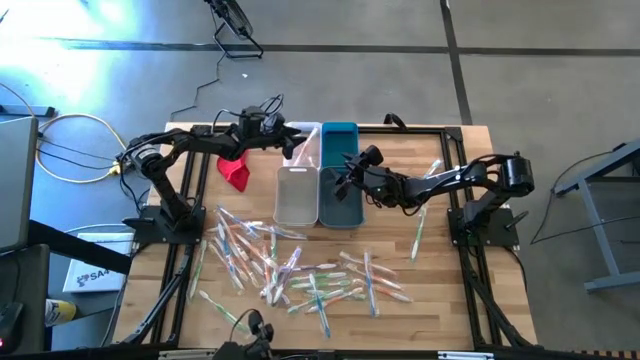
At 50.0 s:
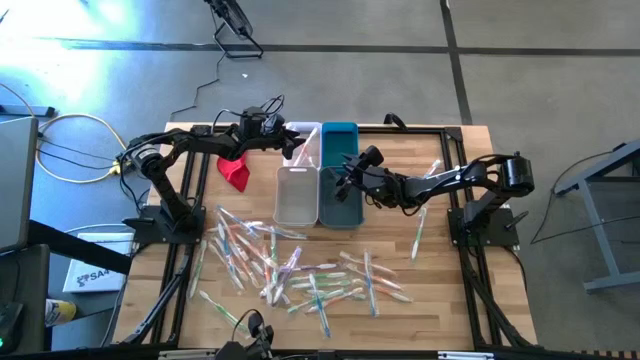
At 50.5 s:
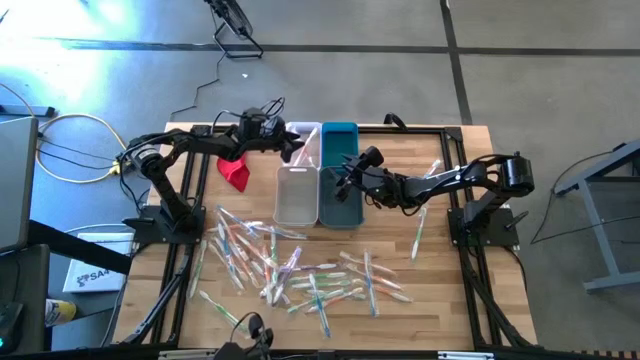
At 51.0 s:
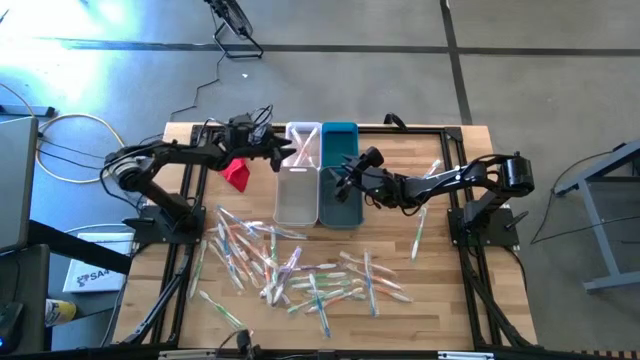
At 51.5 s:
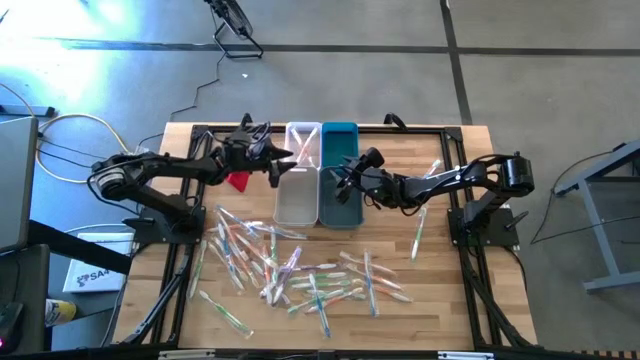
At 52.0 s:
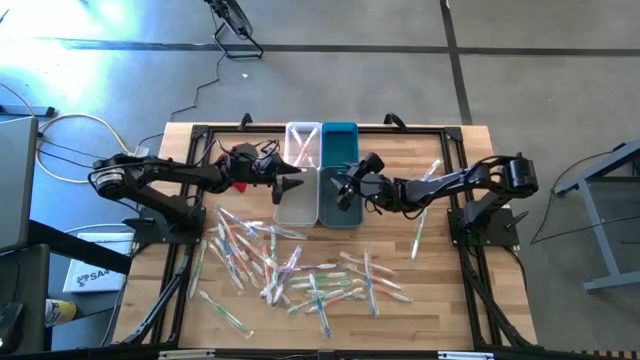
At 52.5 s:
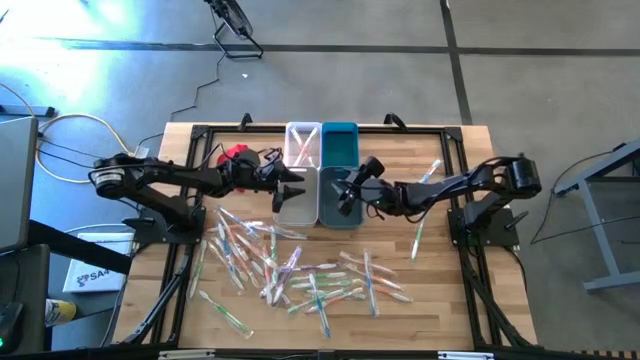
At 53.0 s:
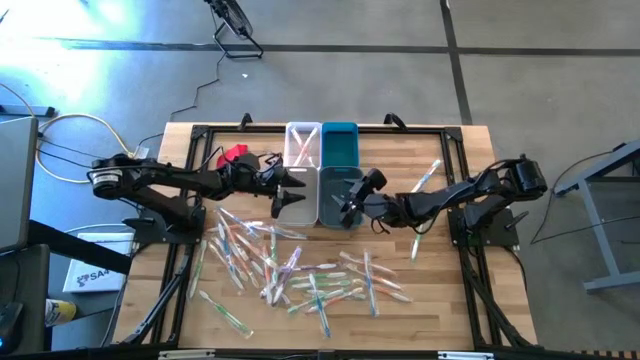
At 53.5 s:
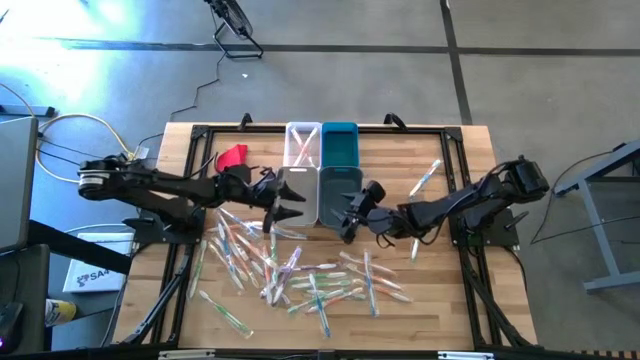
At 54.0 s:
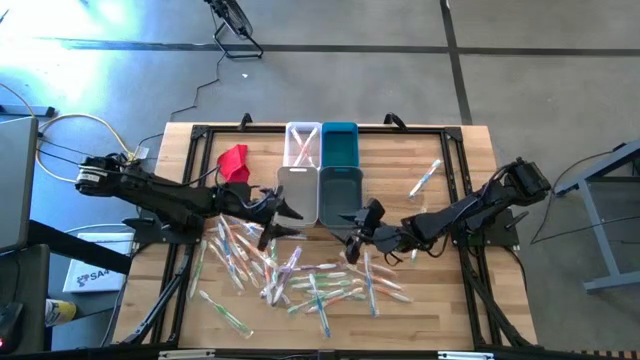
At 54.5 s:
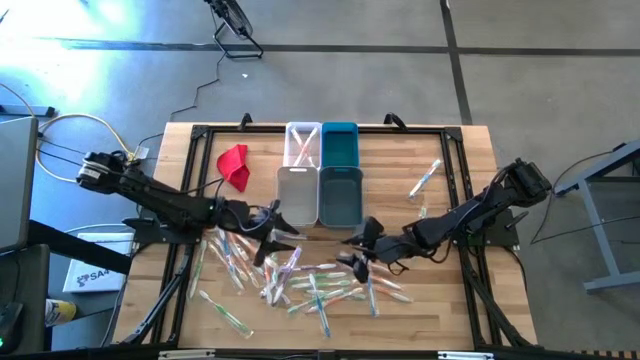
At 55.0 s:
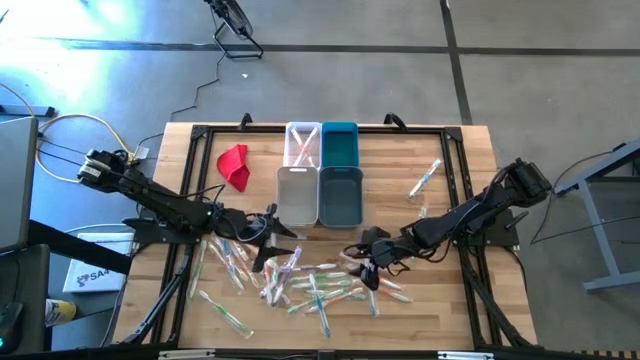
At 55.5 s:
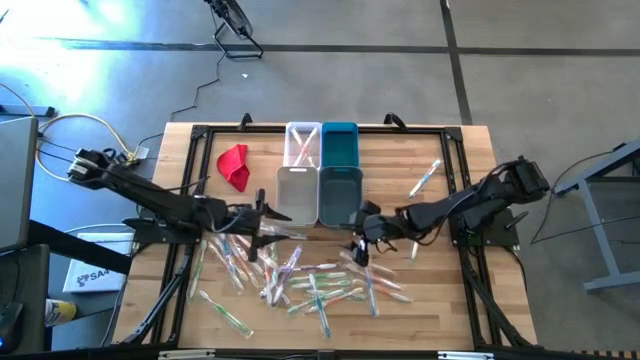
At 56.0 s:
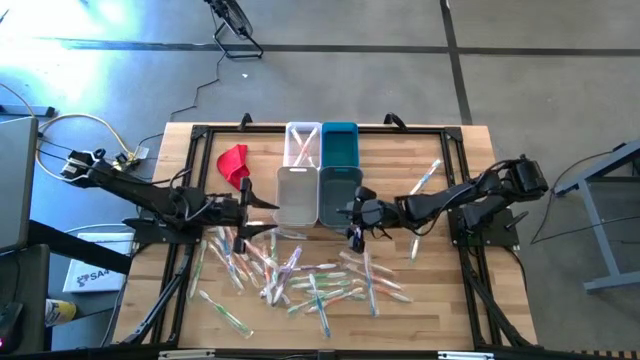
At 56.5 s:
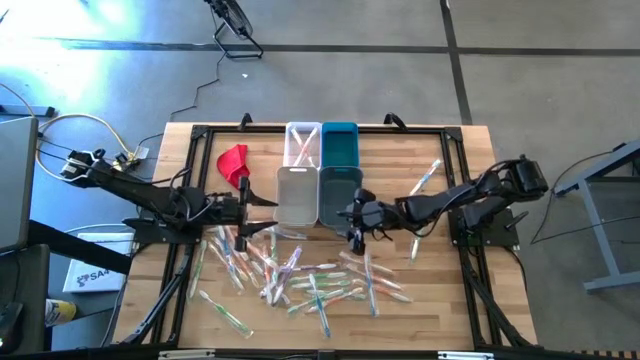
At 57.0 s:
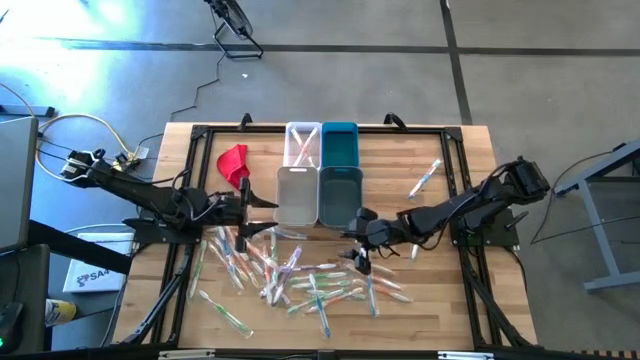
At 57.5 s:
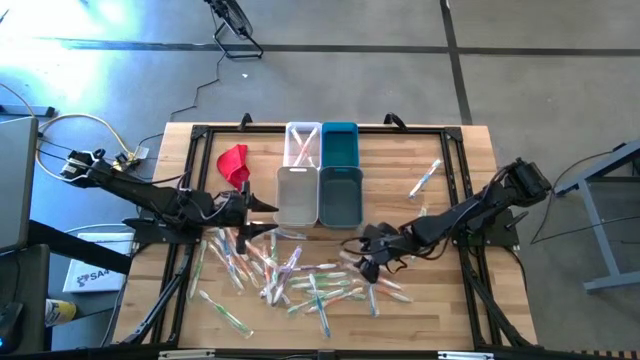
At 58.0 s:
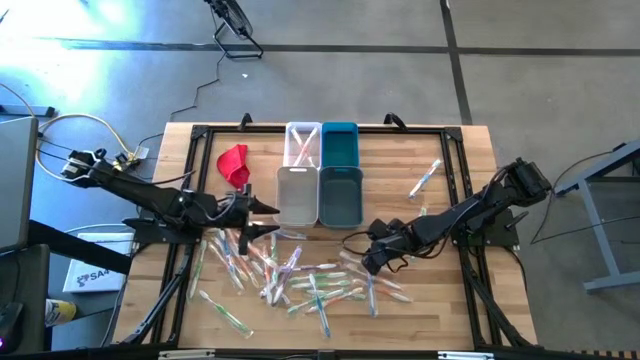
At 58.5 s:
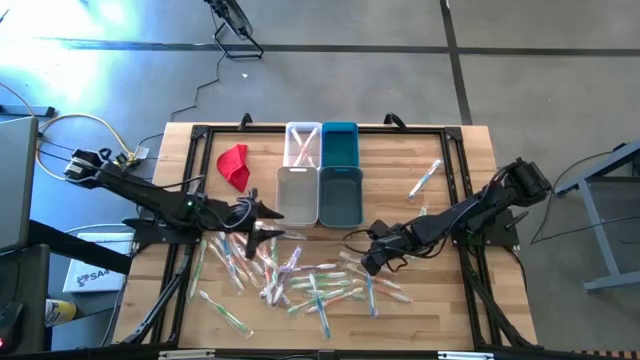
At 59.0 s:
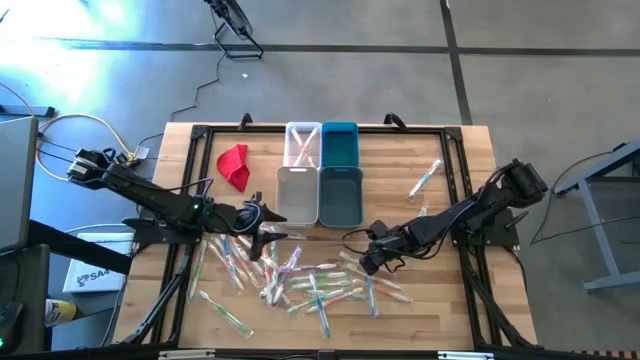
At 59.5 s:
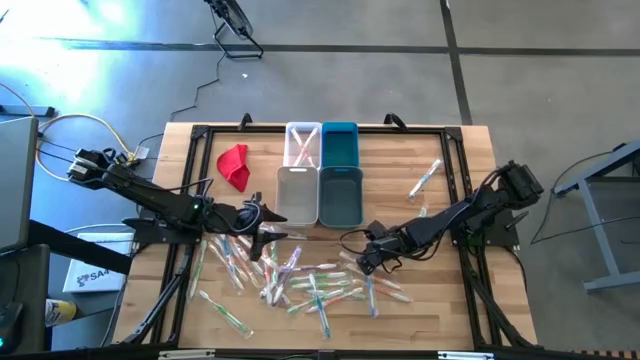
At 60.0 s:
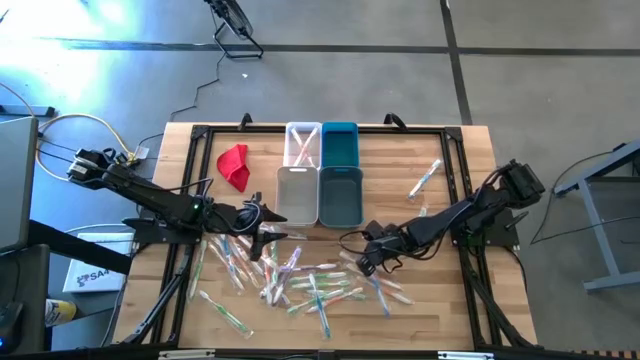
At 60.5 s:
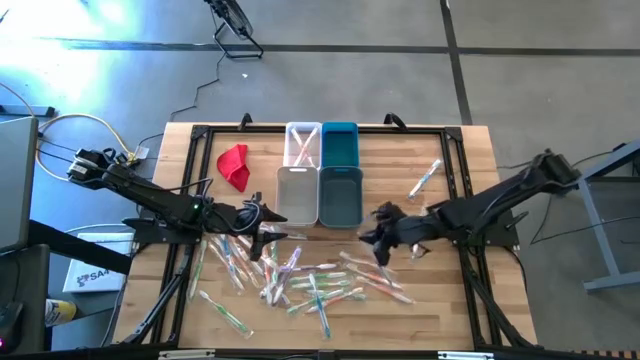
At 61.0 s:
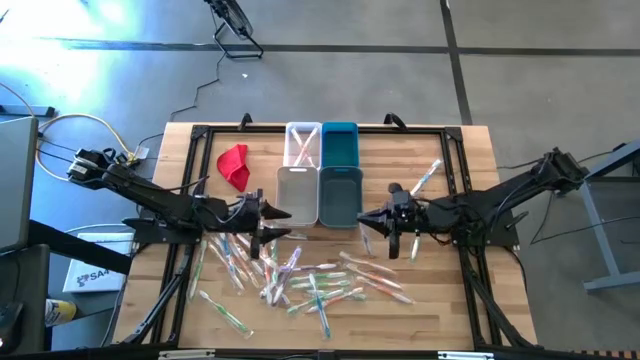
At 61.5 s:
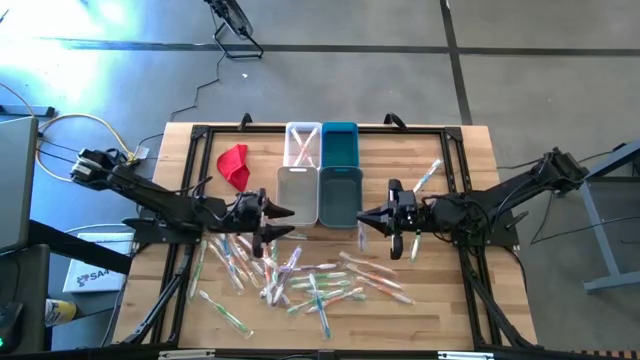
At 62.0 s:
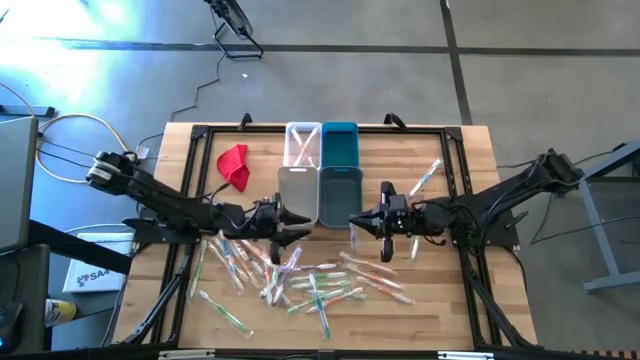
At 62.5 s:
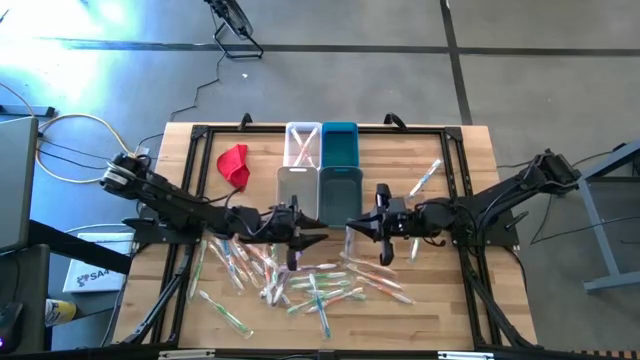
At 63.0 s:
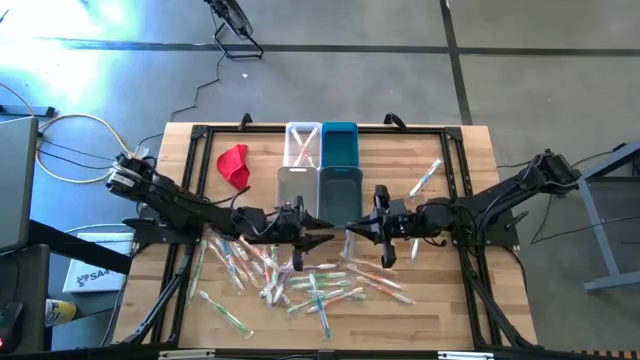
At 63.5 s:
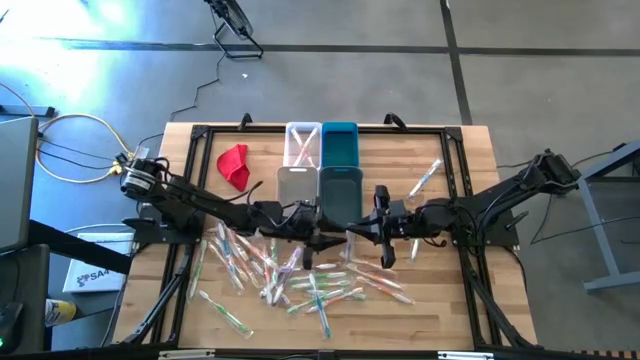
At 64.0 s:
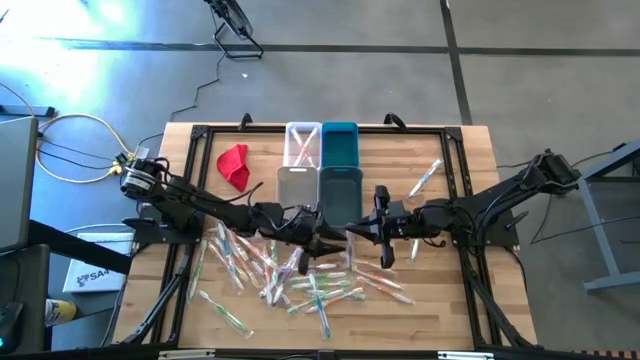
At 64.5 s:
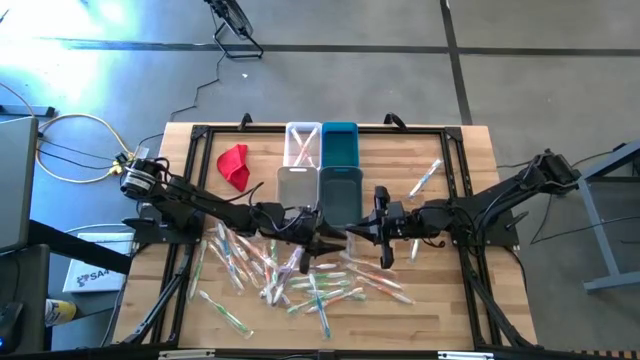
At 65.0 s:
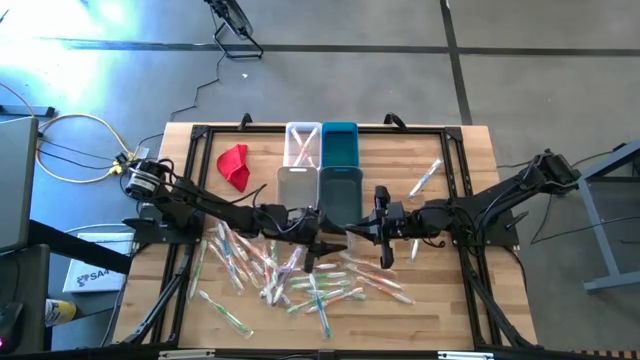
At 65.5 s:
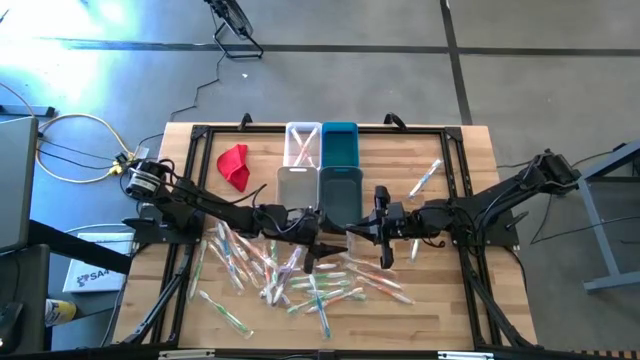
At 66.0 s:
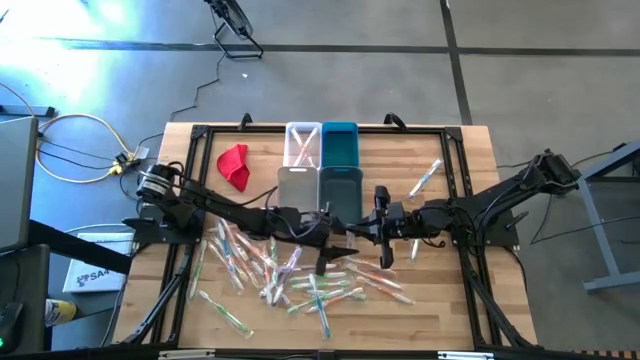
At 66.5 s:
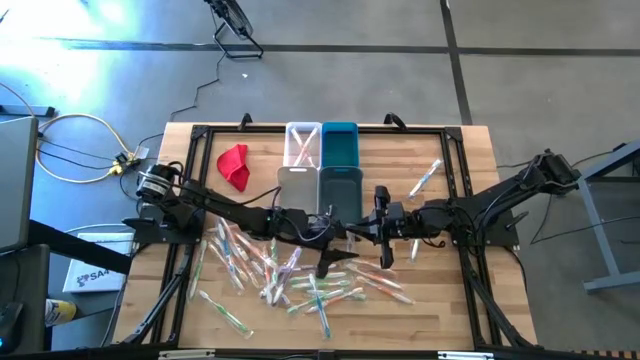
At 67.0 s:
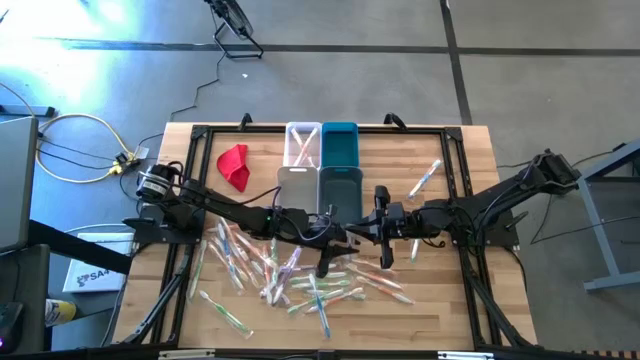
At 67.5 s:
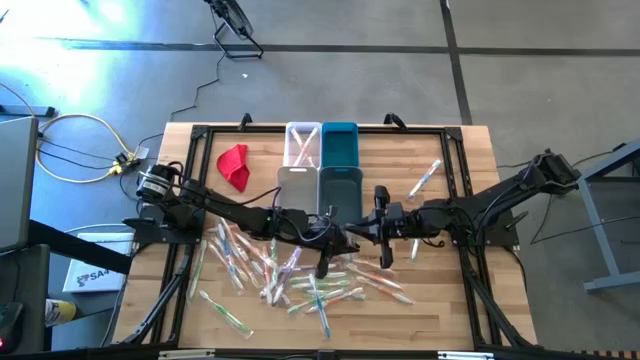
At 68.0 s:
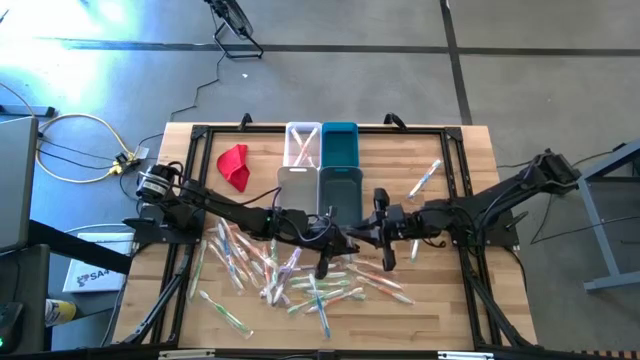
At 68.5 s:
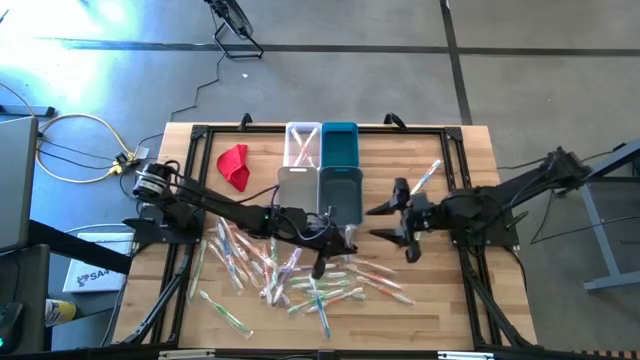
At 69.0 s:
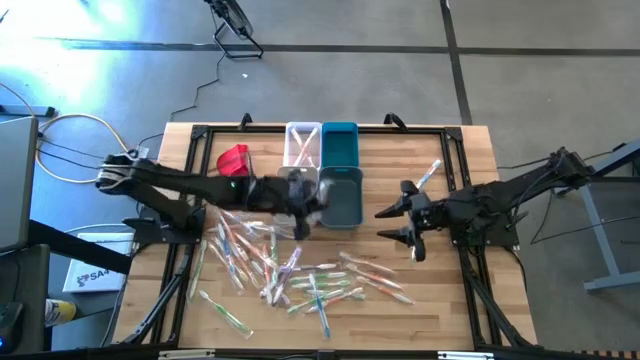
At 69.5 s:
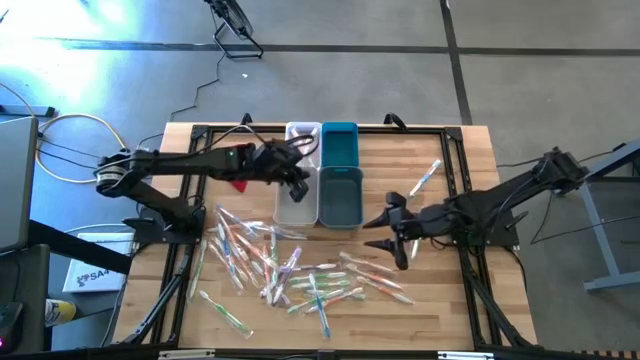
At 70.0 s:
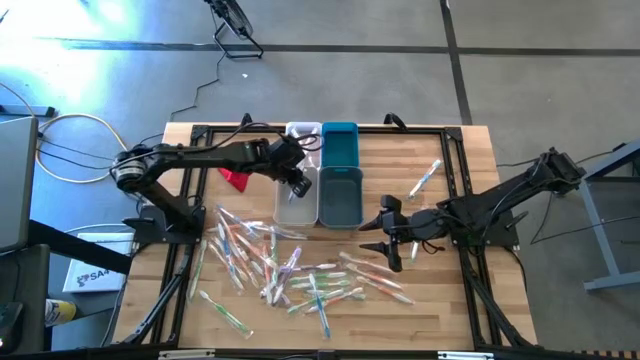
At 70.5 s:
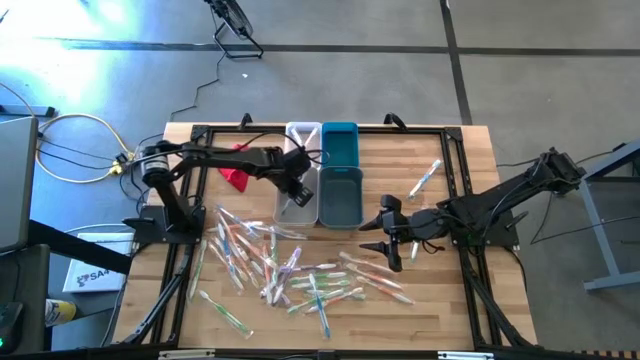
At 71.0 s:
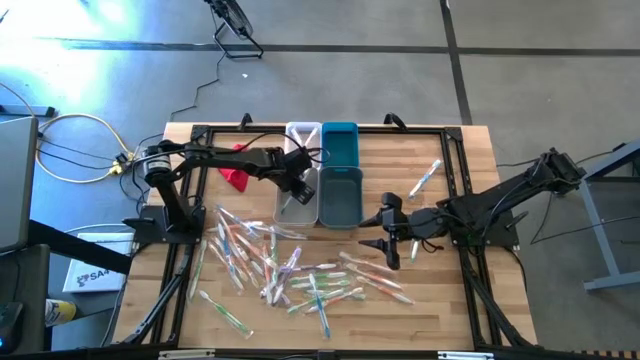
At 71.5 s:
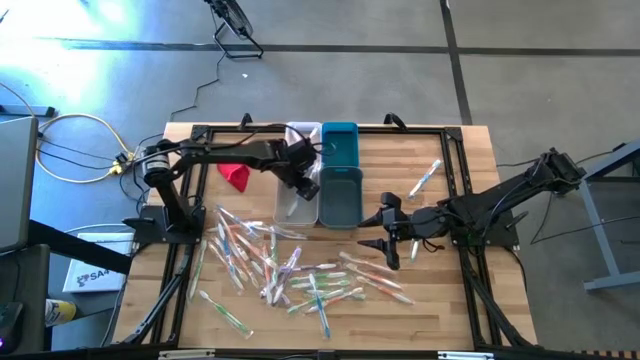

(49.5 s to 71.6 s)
Task: Pick & Place Toothbrushes
Put the blue toothbrush into the gray bin
